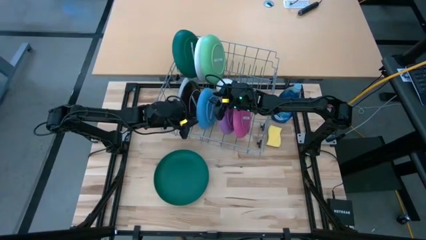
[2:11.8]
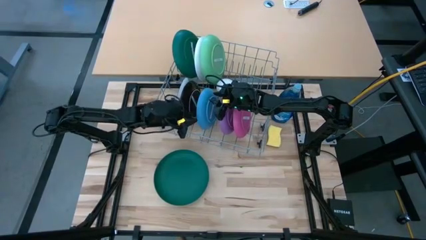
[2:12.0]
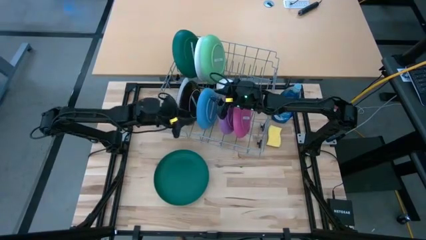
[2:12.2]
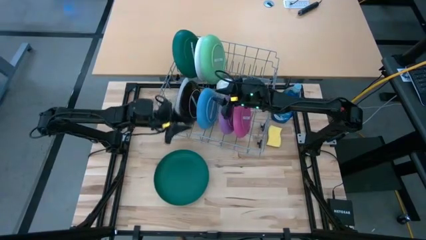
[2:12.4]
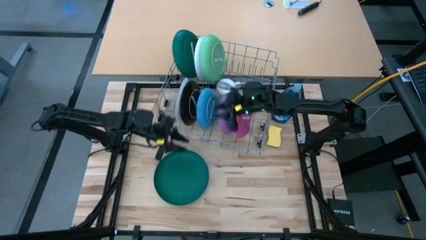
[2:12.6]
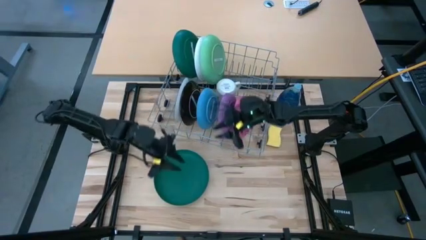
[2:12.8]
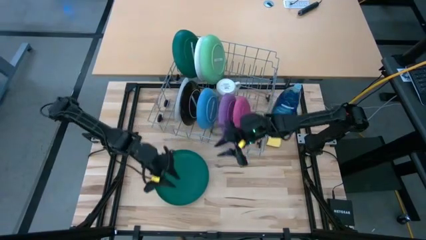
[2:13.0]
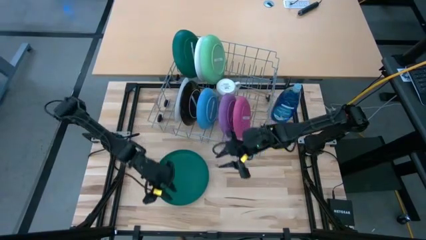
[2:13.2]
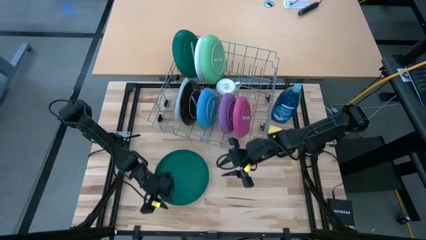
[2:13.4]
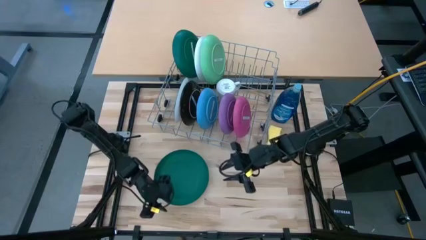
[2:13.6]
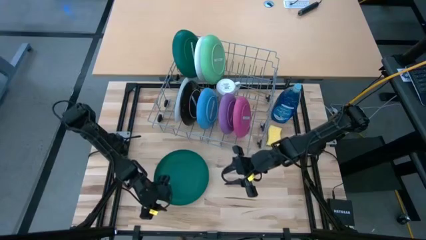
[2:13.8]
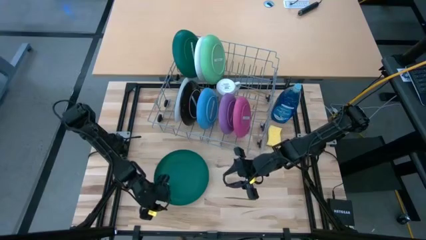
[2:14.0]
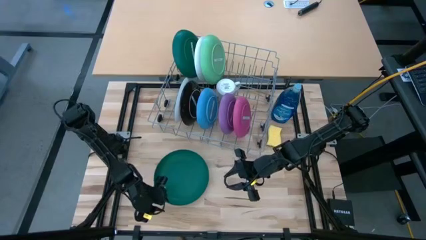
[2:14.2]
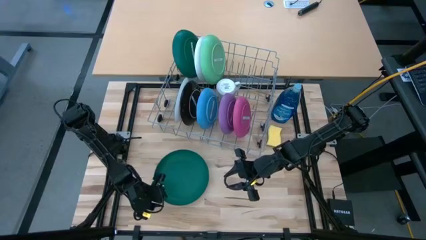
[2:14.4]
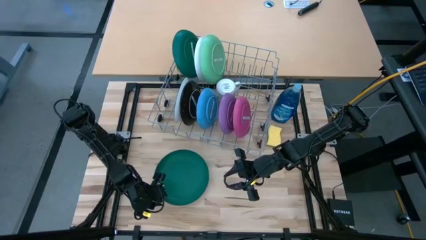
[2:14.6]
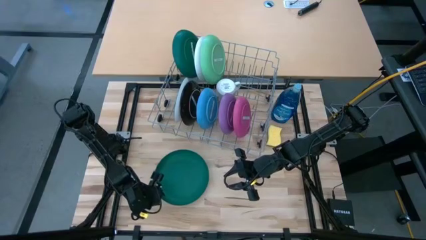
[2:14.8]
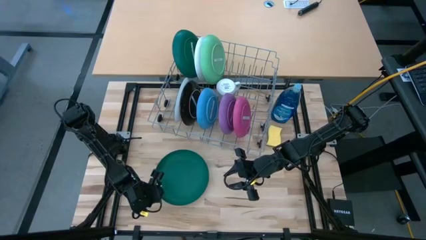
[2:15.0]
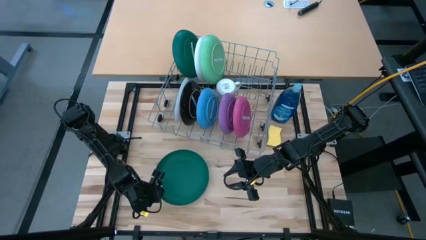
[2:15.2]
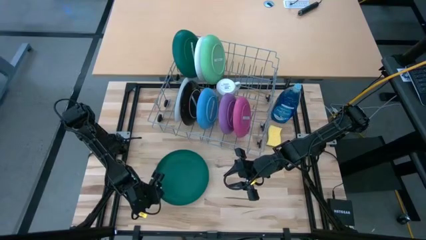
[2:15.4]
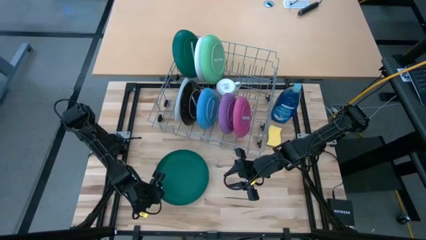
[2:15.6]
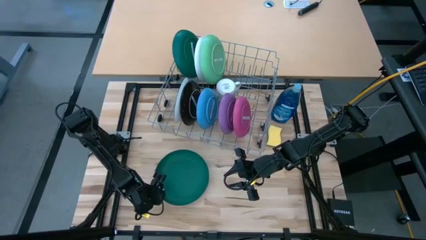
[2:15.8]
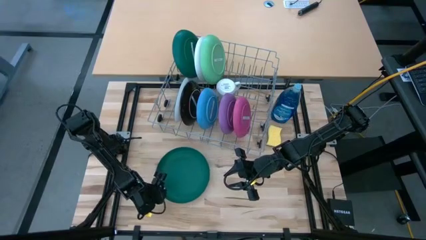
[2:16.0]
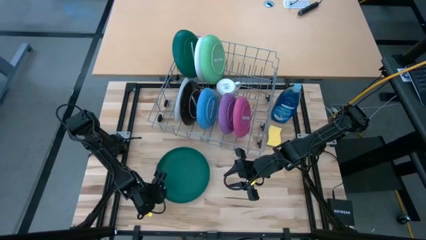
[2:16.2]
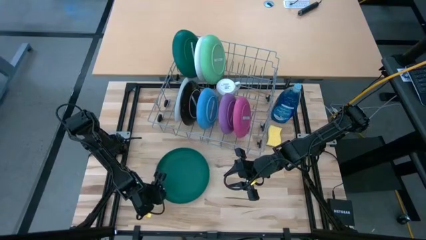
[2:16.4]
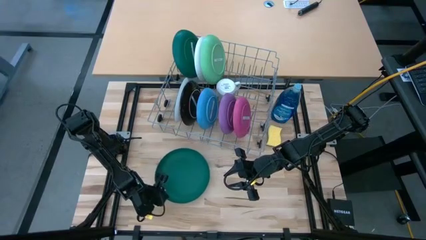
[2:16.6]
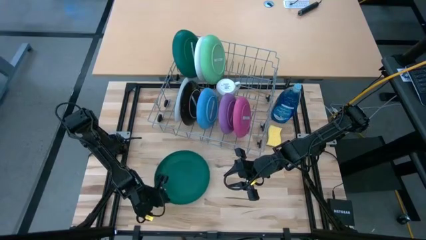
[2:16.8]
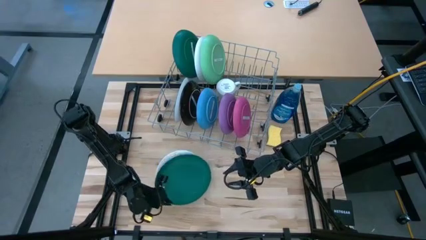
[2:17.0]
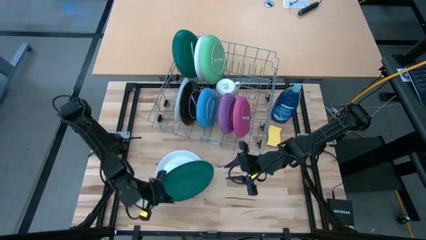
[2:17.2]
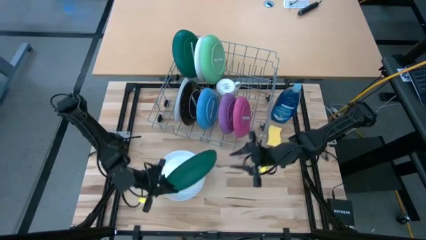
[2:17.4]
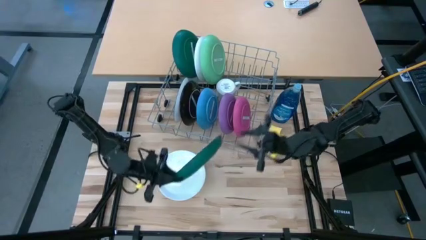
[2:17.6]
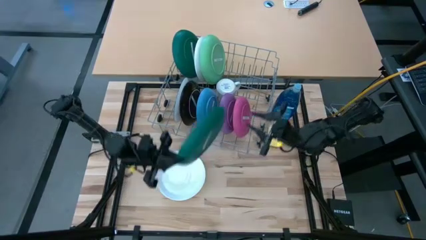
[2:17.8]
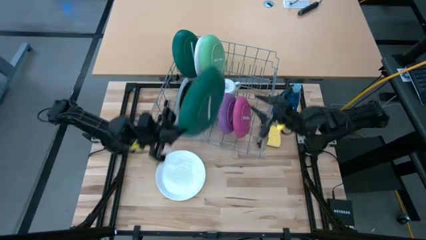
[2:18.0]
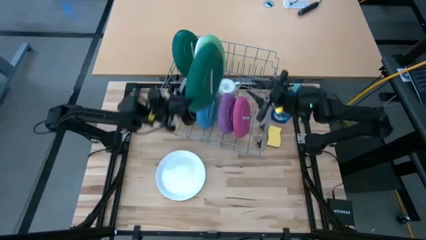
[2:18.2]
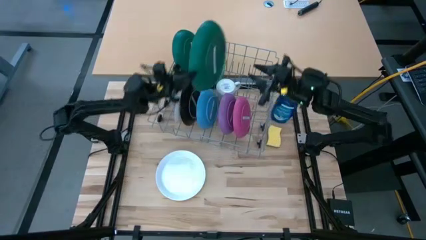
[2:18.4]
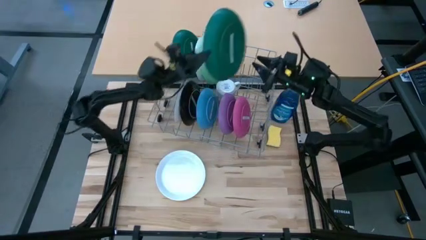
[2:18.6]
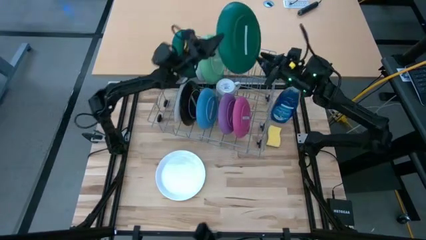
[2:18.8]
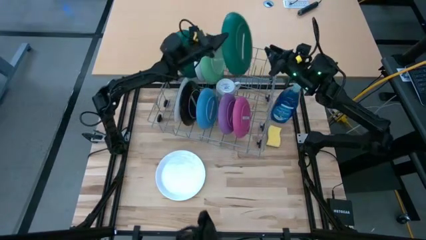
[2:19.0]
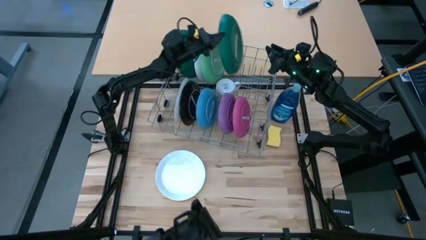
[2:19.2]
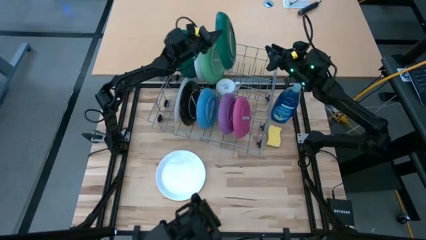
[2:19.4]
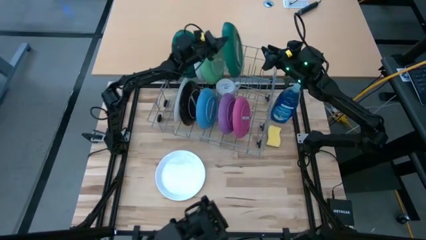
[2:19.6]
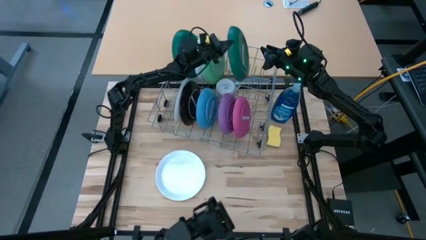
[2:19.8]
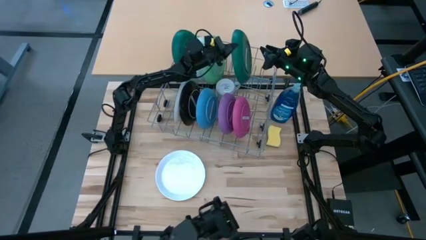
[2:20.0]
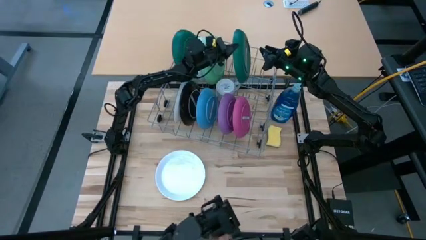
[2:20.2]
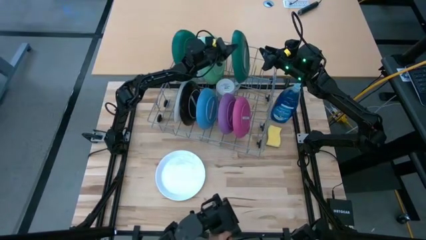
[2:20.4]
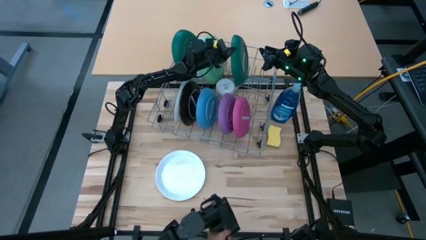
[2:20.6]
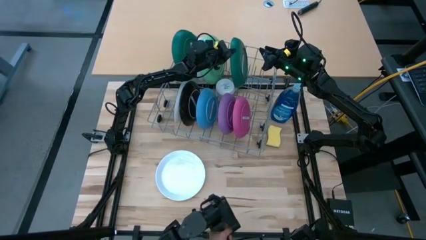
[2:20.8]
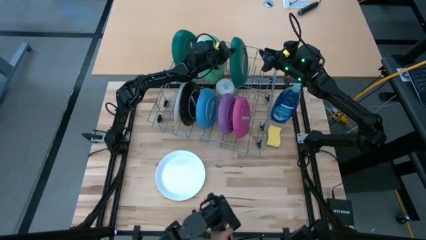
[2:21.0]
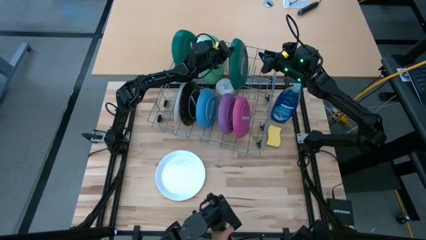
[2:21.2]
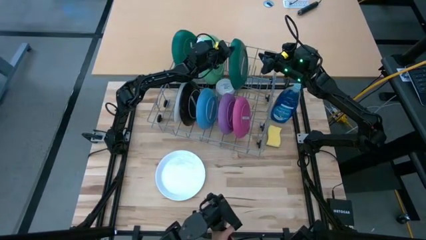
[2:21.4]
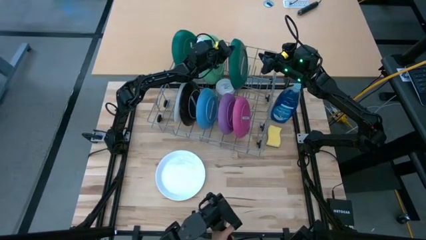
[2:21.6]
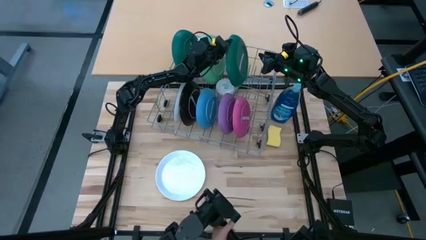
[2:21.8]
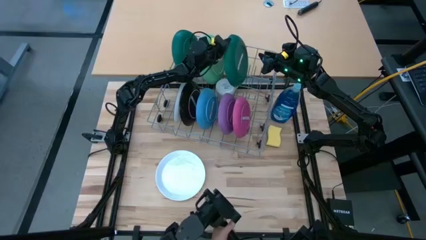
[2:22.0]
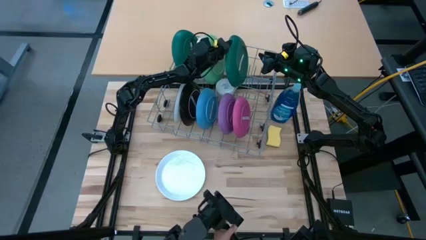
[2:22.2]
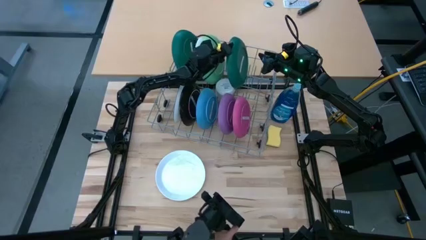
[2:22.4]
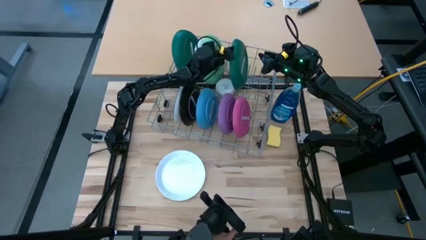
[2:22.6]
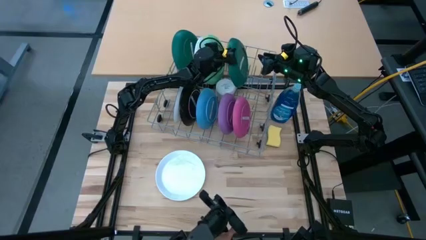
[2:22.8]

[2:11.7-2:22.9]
Task: Sort dishes
Put the dark green plate in the dish rack

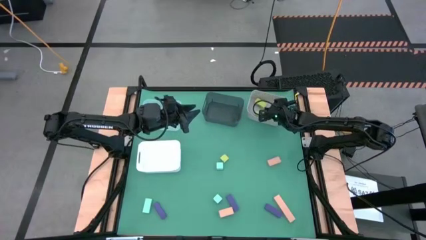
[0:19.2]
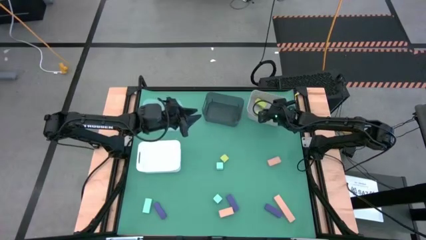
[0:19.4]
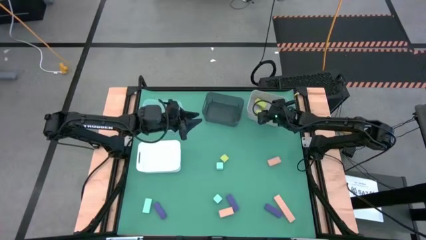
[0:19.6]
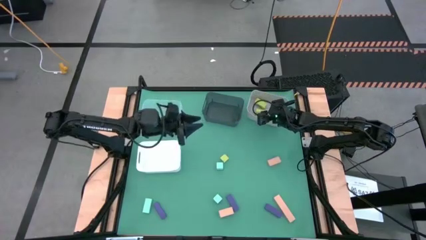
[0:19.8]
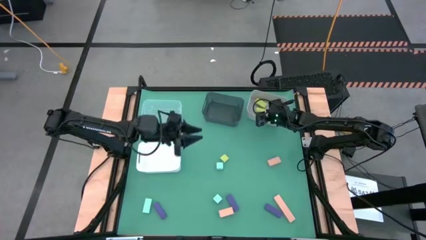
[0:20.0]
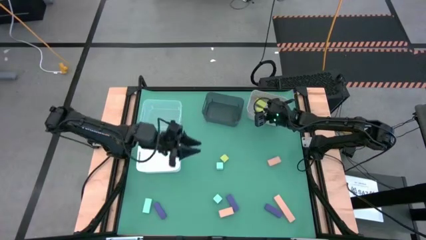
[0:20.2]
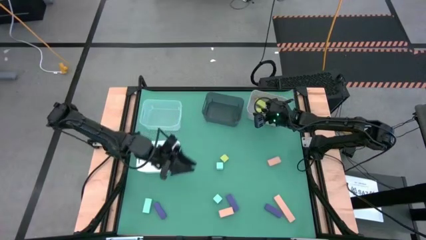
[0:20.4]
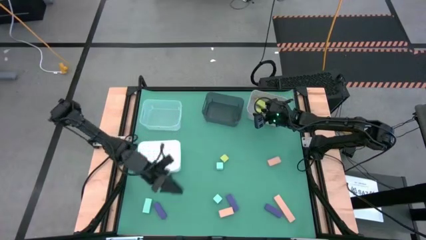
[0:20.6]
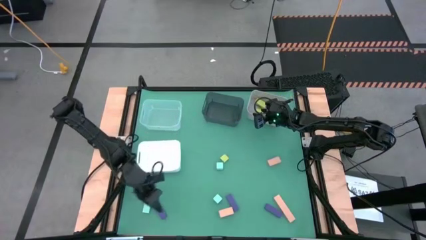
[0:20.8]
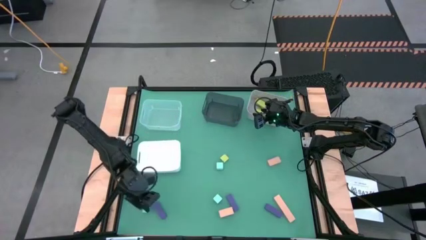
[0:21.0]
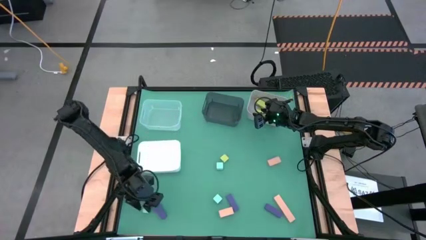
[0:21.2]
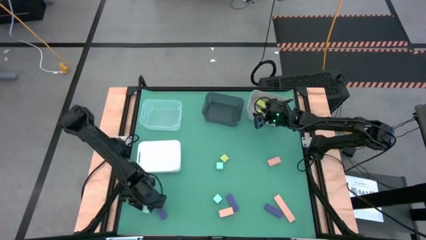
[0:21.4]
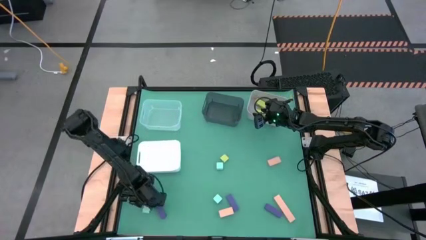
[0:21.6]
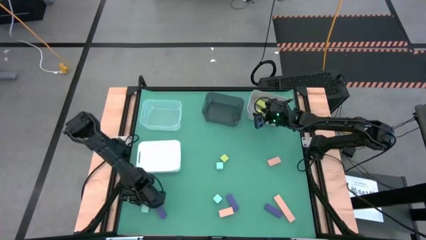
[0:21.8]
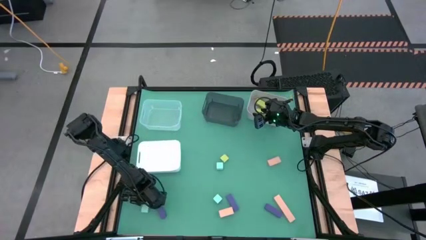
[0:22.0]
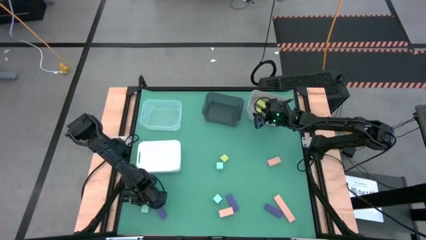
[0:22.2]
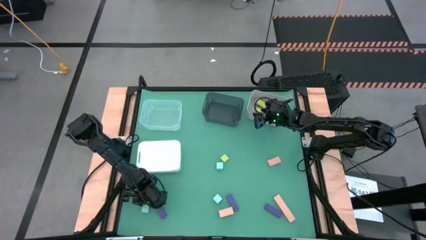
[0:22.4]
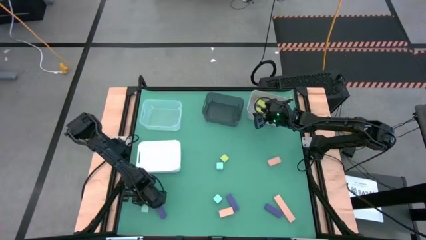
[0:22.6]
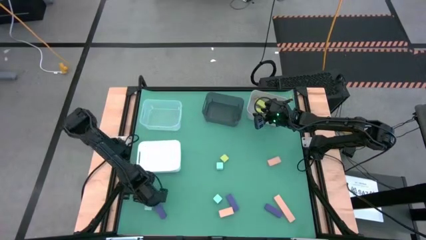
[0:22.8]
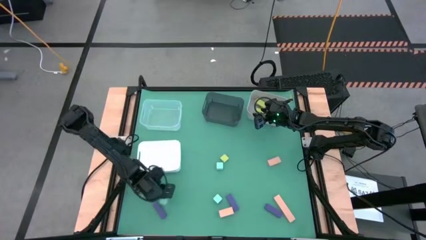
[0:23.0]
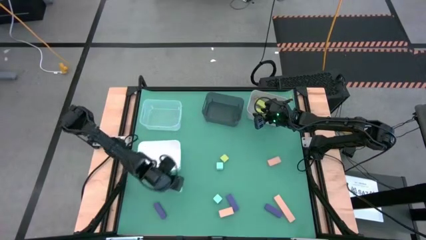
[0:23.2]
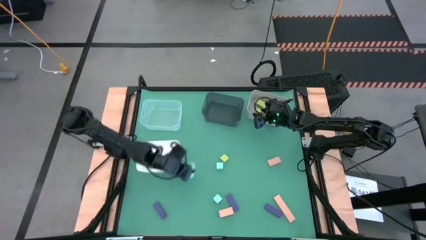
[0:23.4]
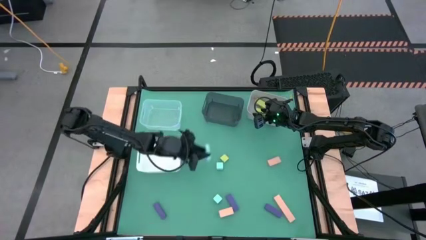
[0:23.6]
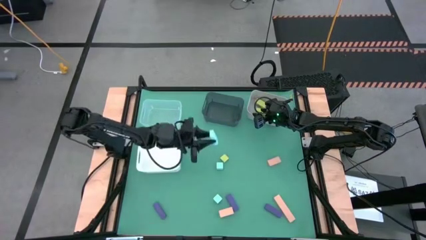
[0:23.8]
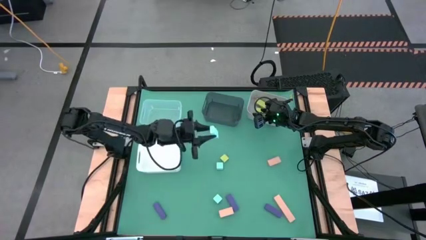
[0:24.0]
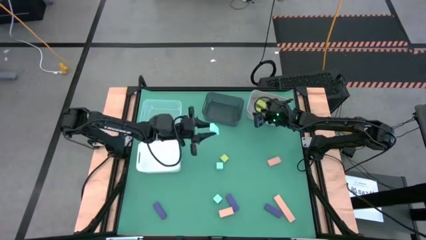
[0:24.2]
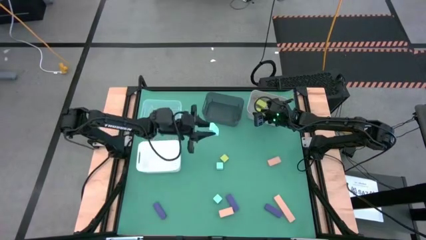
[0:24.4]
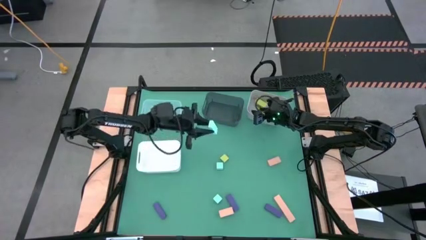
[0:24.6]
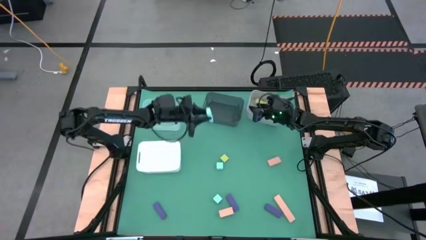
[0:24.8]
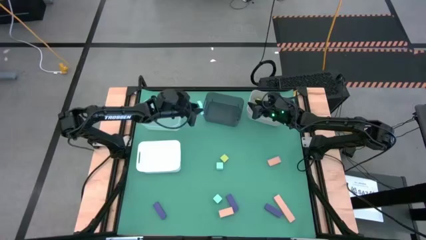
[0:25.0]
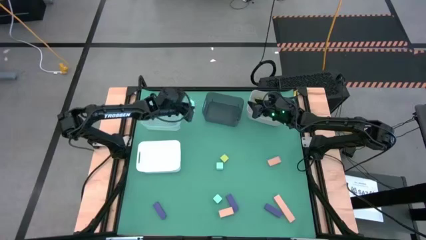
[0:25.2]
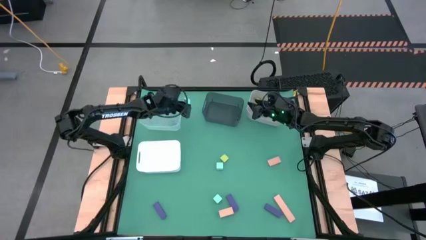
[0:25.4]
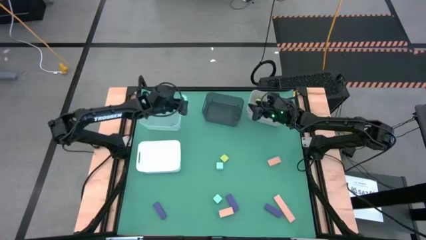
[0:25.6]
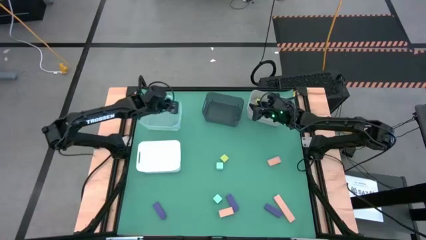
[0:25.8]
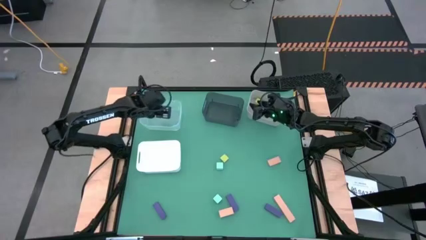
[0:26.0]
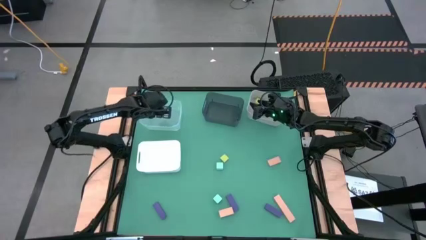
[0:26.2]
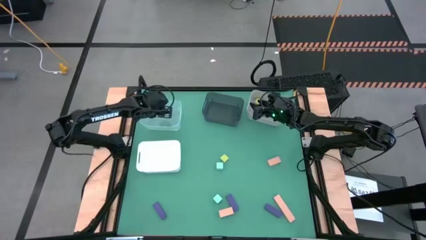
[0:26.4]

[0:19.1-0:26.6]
Task: Sort & place blocks by color
Put the bottom left blue block into the transparent bin
